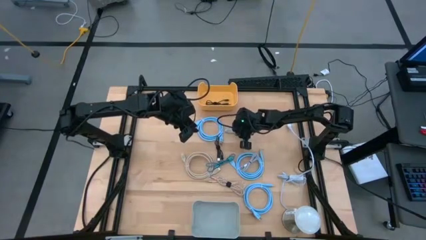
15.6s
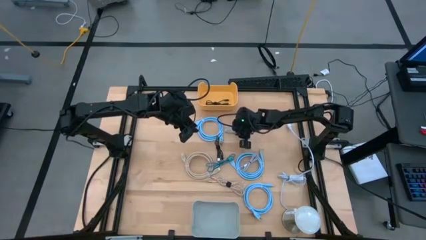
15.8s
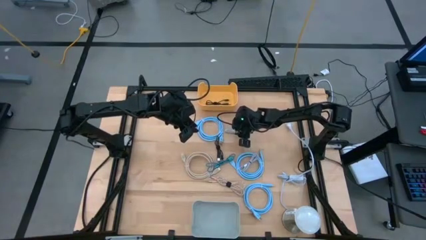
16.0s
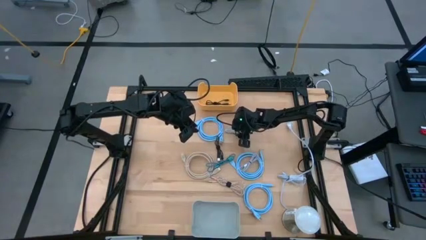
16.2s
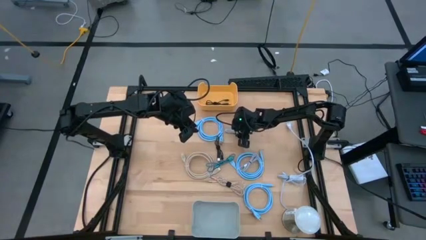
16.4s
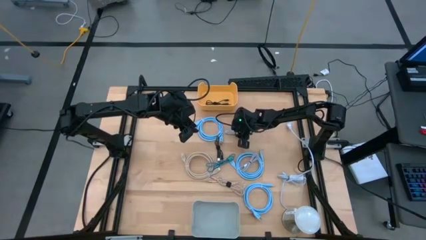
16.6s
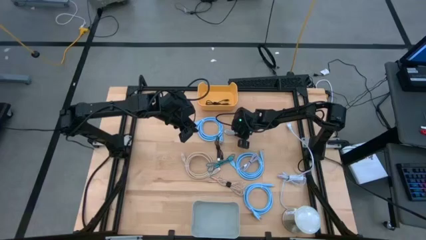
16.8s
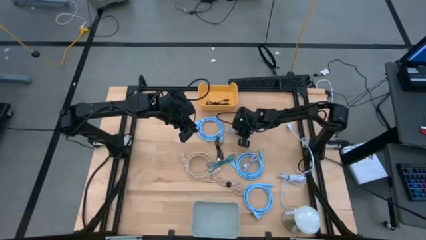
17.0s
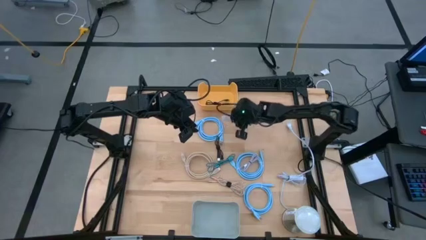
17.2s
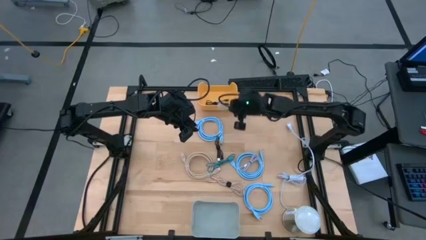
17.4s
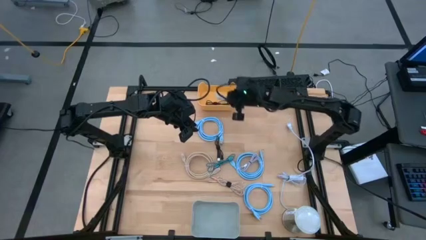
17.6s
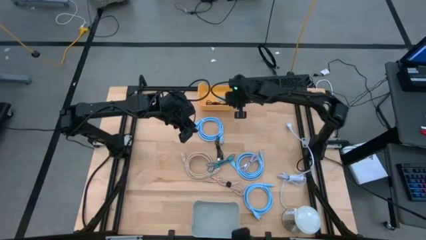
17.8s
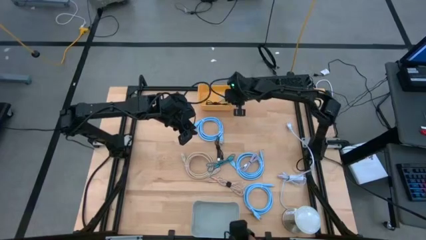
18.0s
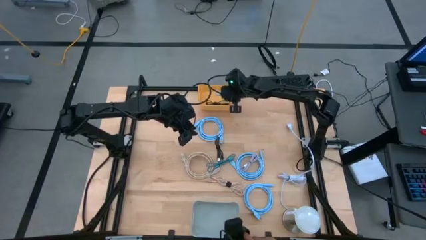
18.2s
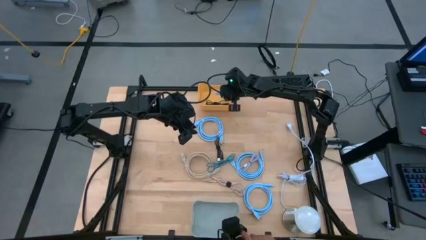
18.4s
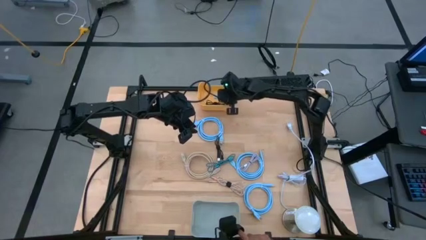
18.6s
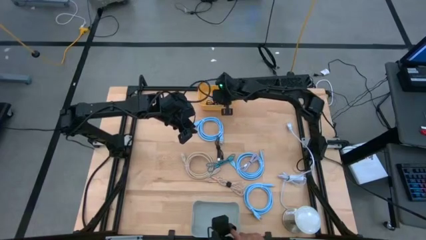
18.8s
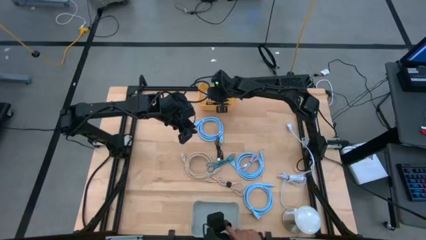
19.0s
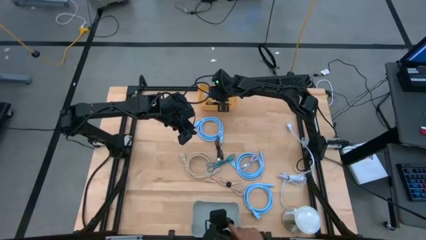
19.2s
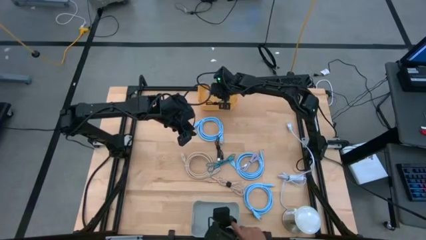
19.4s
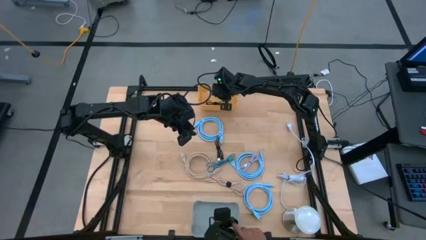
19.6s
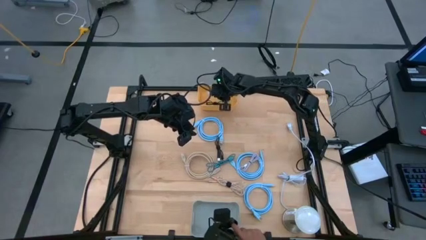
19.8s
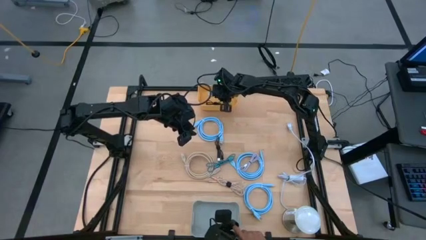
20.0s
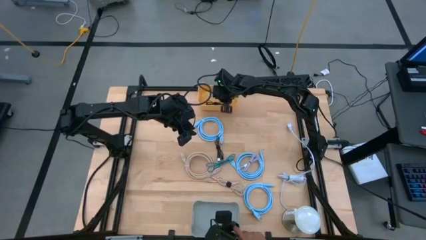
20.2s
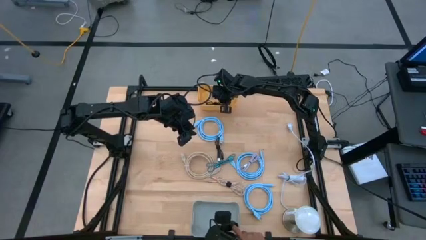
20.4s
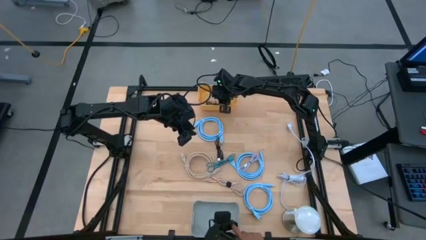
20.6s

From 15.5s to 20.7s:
Task: Sort cables into bins
Put the white charger cable into the yellow bin

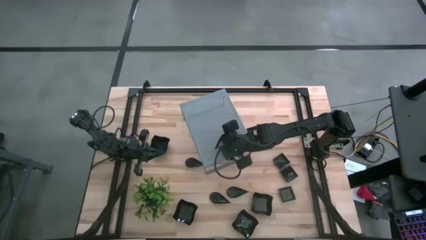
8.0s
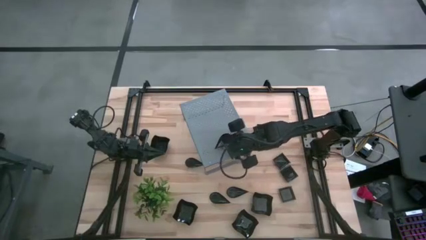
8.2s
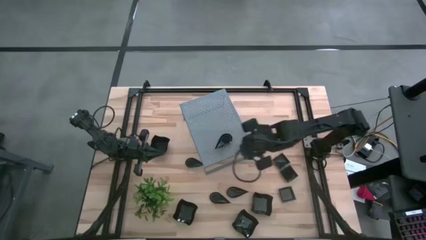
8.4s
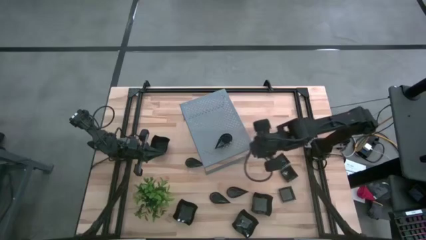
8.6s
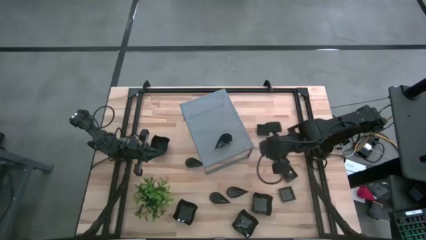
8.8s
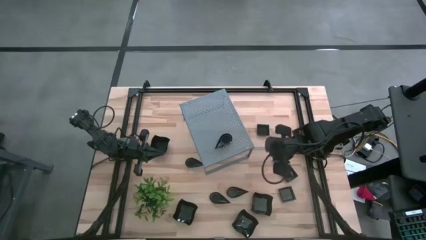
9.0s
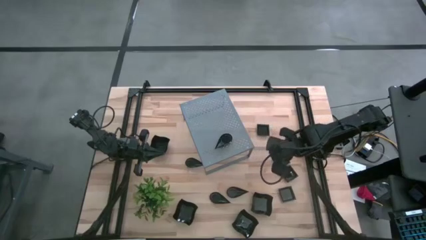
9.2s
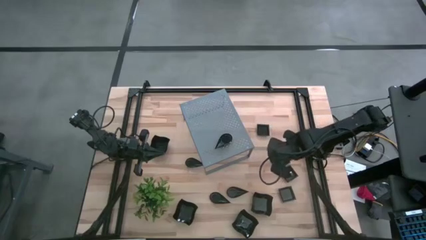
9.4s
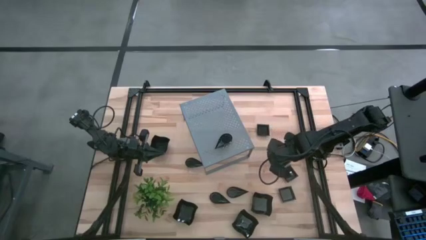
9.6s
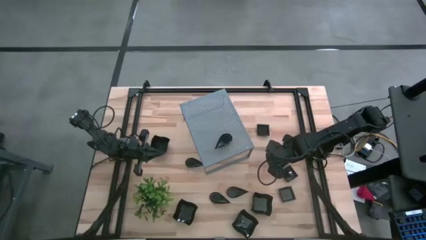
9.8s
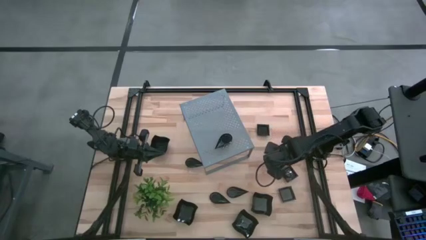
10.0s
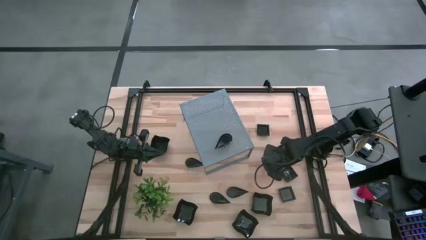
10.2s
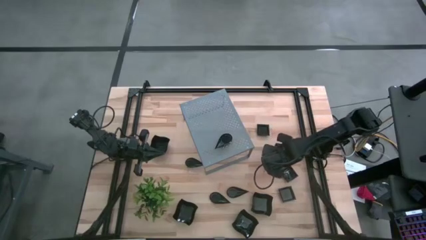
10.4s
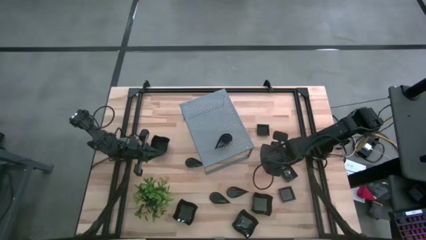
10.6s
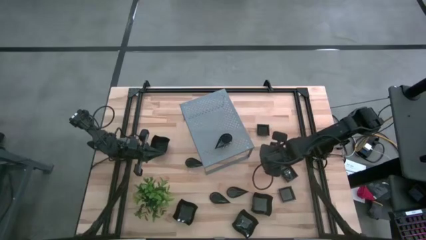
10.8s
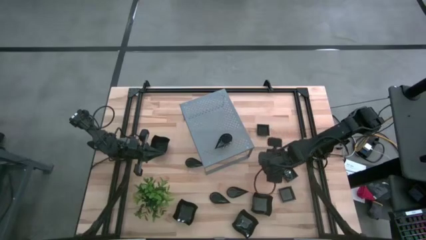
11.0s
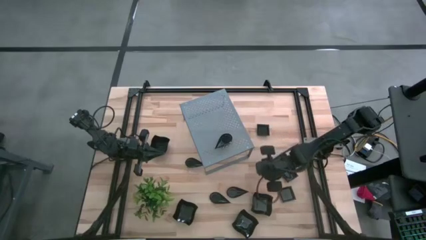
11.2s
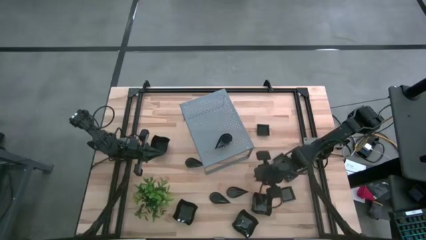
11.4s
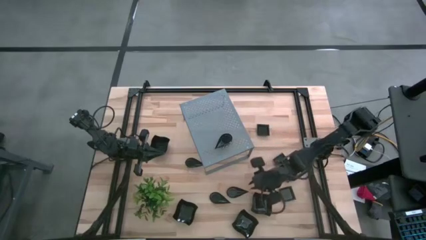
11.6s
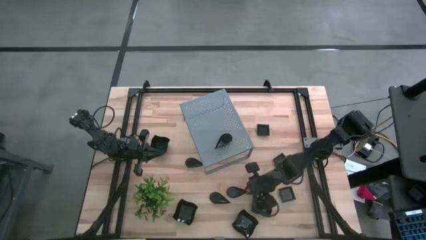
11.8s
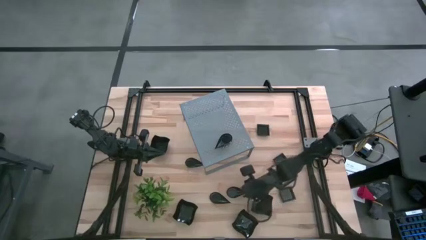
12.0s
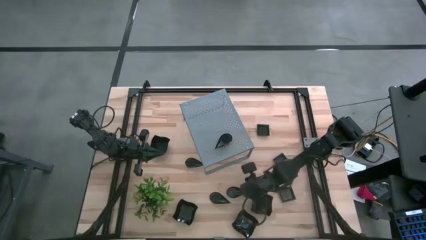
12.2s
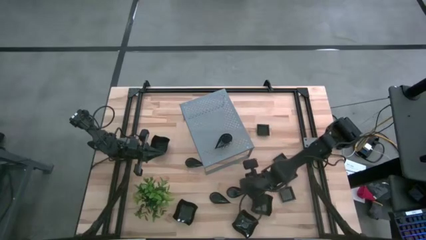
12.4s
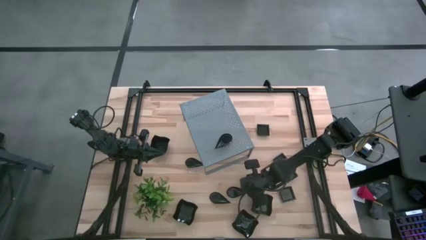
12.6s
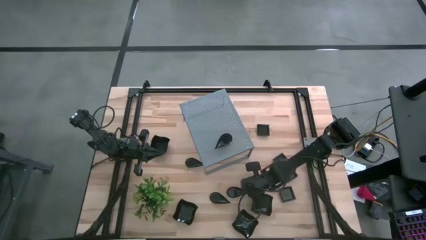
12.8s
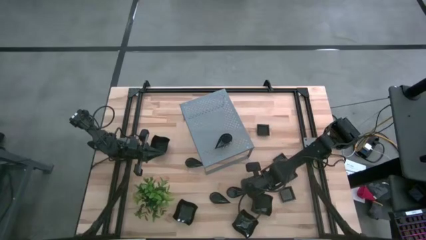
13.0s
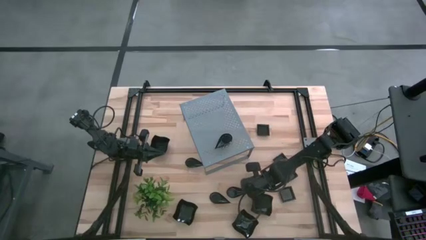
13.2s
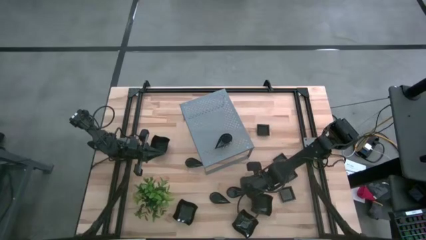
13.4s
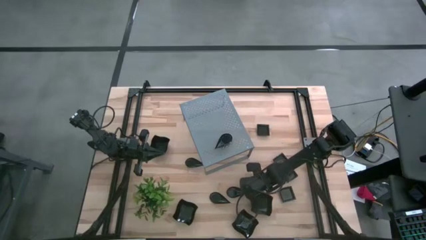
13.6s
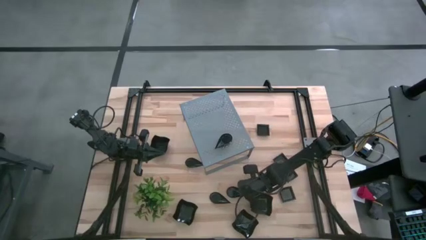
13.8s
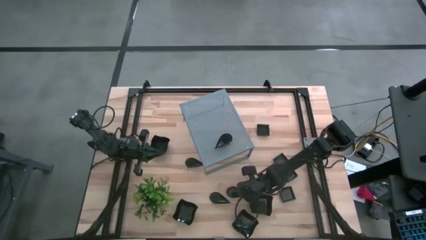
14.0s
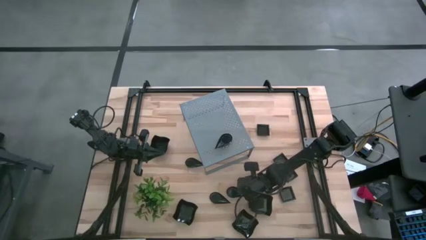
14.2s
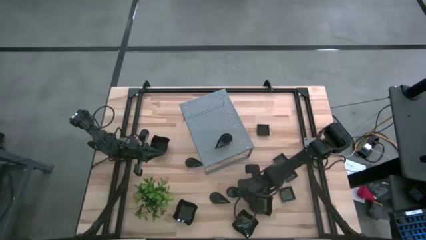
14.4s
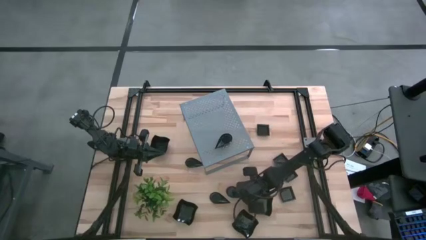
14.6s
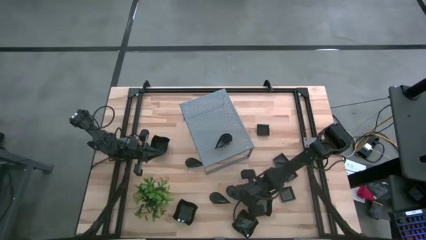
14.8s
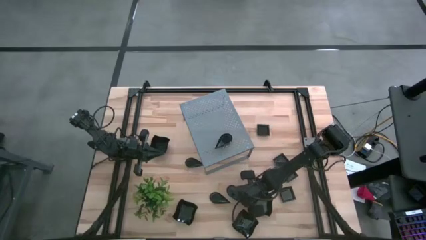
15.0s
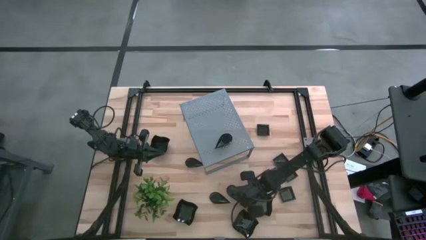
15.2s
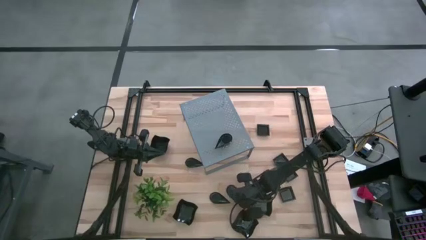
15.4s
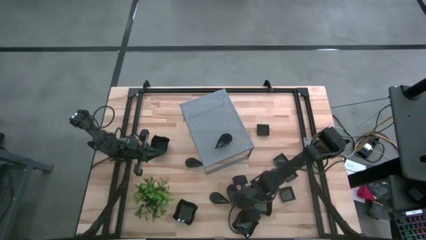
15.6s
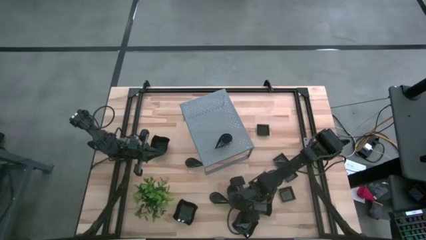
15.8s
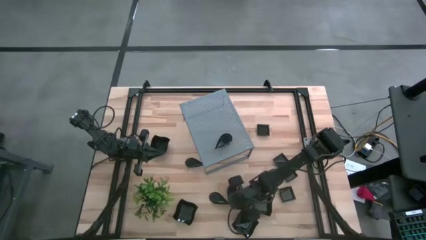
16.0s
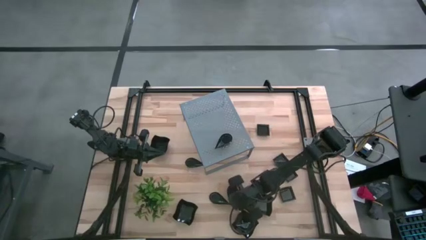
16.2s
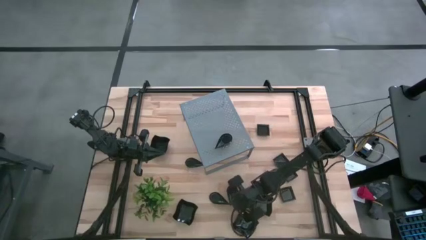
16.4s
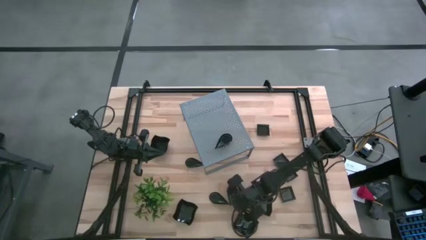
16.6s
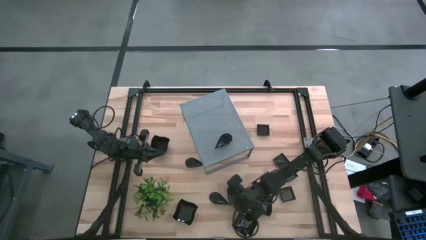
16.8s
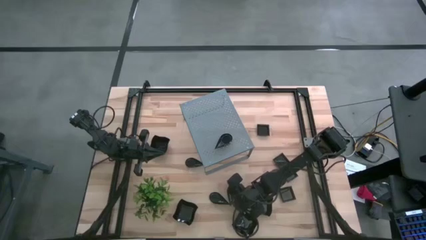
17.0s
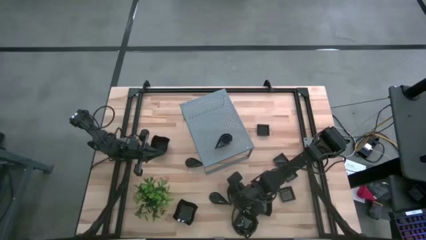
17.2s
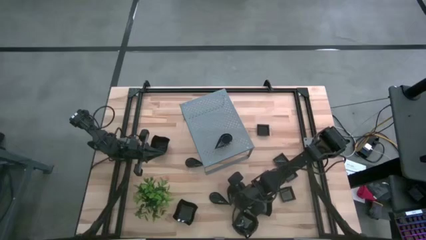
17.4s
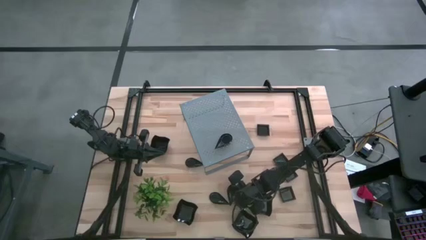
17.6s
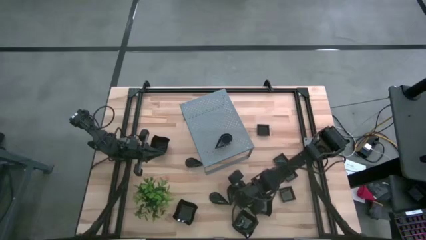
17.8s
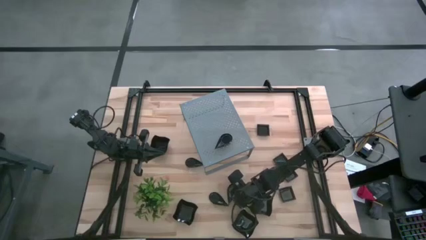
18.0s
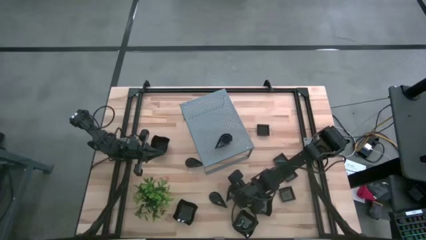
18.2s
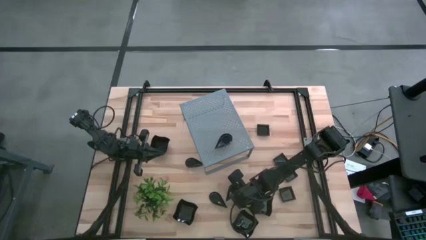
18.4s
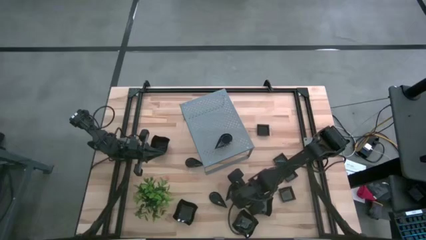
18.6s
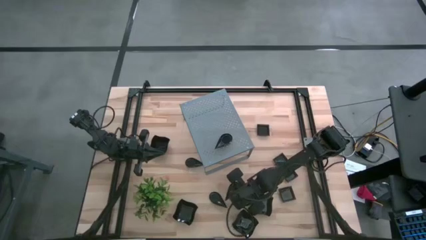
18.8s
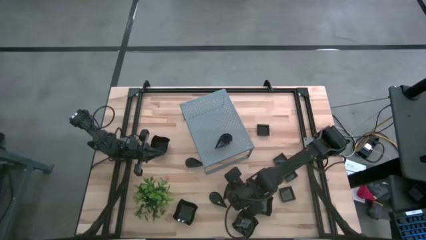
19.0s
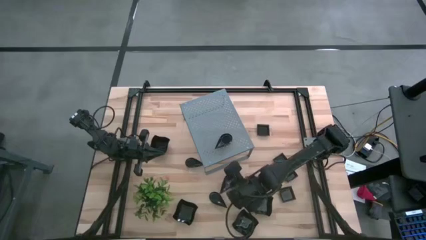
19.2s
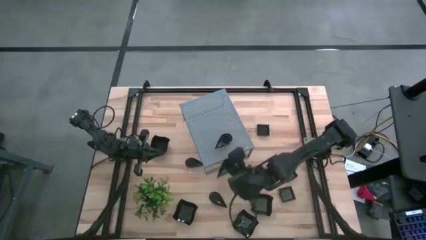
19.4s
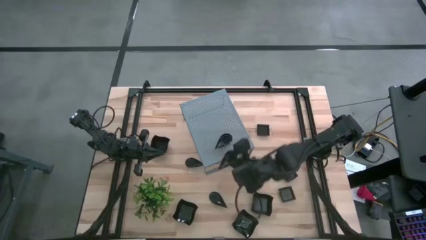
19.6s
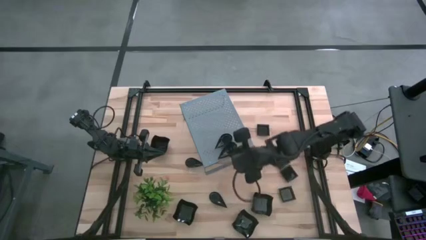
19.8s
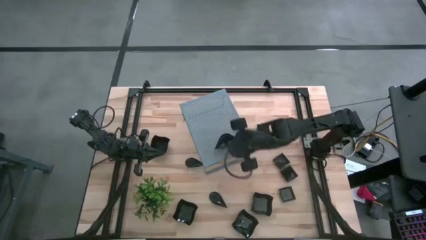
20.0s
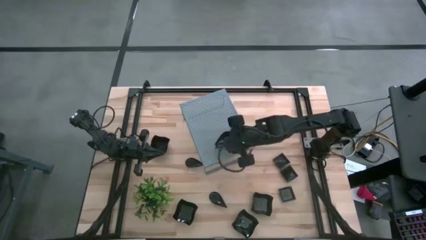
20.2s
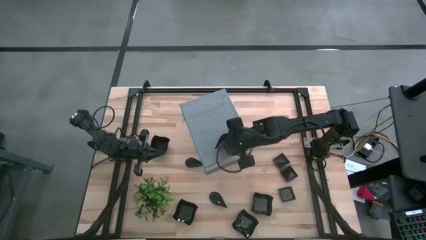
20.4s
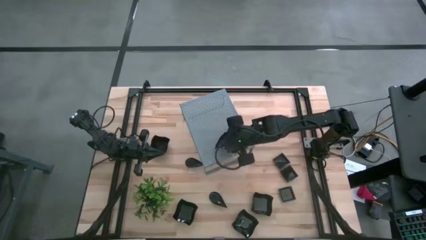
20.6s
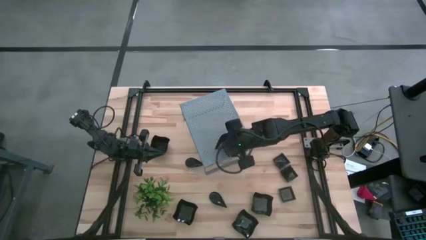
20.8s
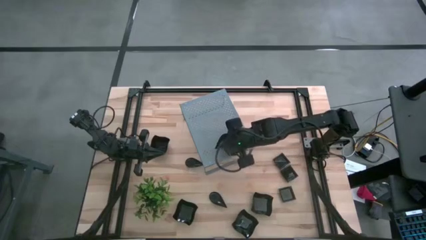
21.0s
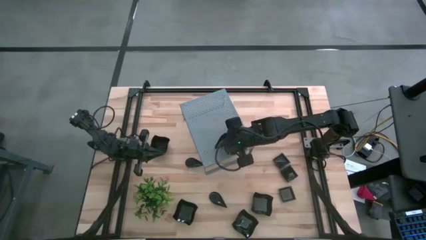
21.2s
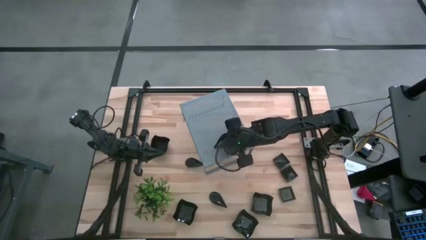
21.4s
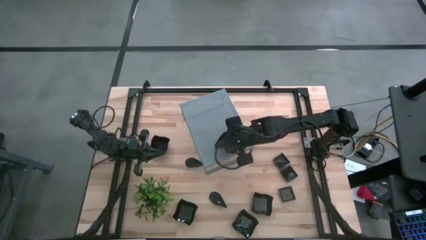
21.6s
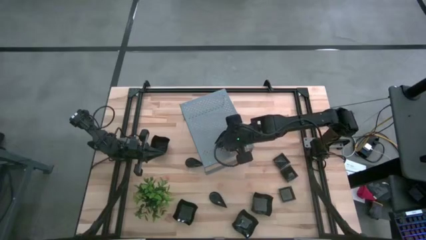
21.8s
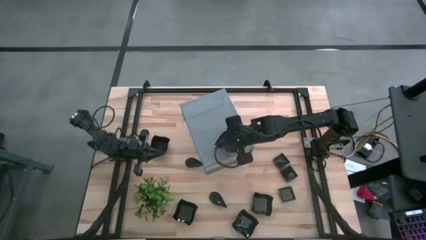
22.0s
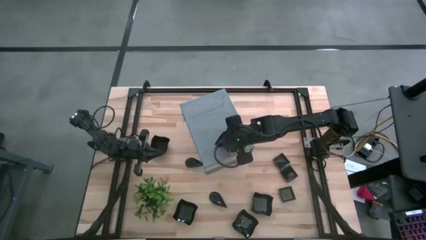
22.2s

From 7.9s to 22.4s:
Task: Pick & Place Mini shaped plates
Stack the drop-shaped plate on top of the drop-shaped plate on the shelf
